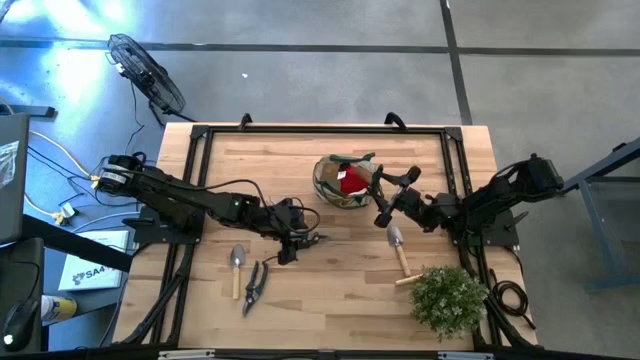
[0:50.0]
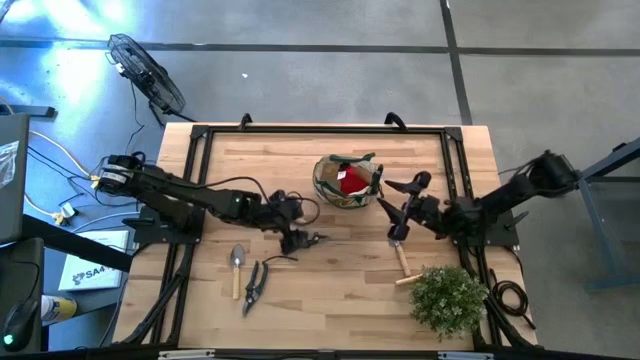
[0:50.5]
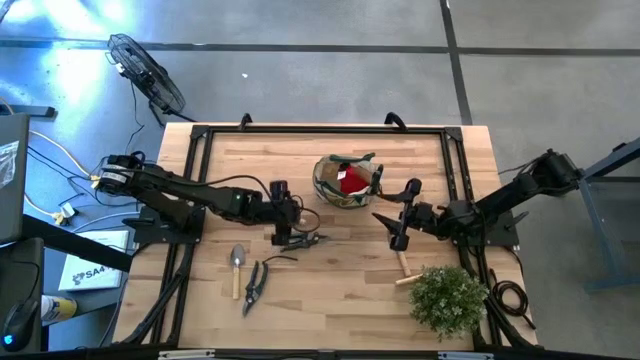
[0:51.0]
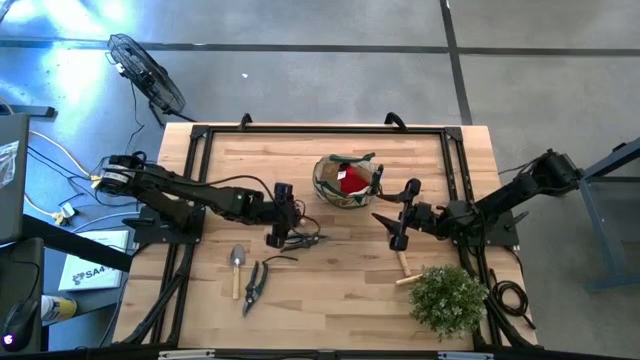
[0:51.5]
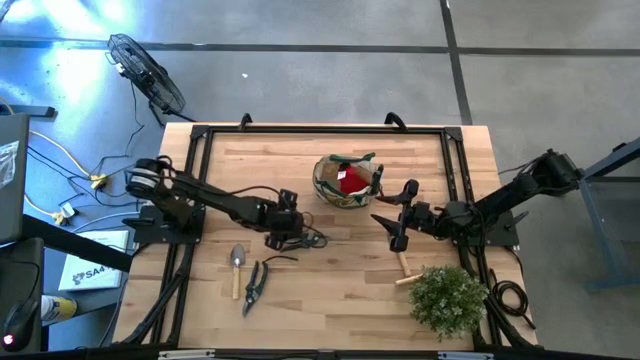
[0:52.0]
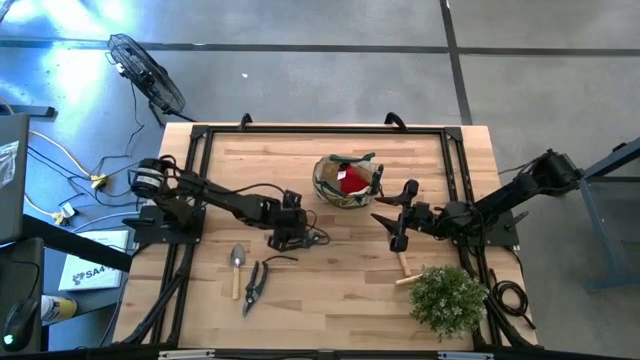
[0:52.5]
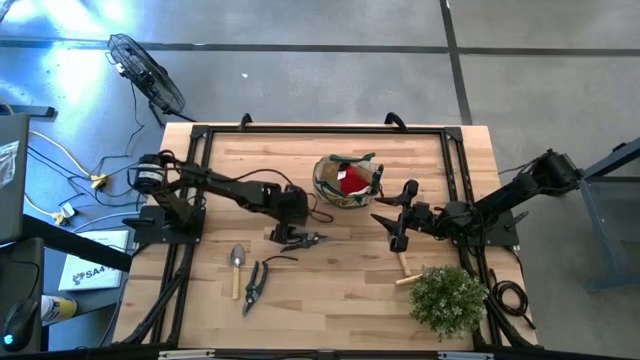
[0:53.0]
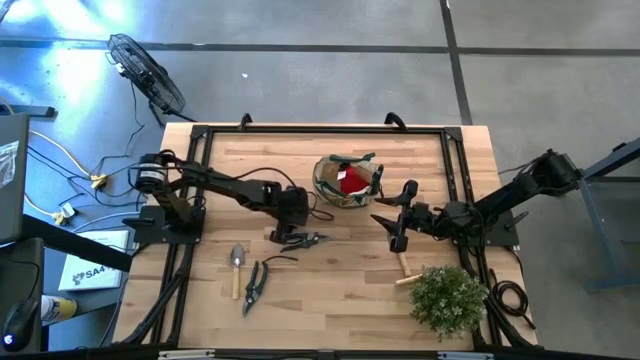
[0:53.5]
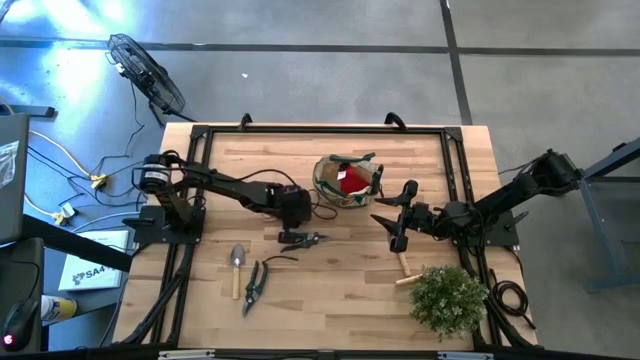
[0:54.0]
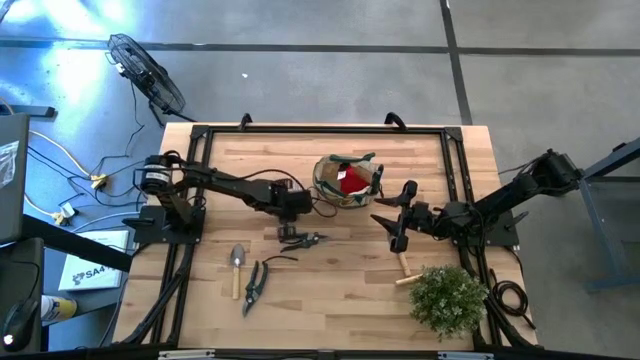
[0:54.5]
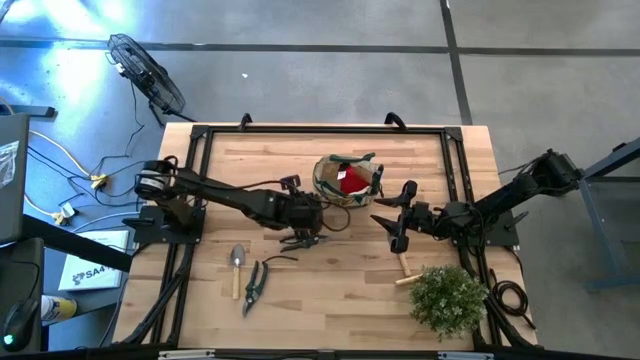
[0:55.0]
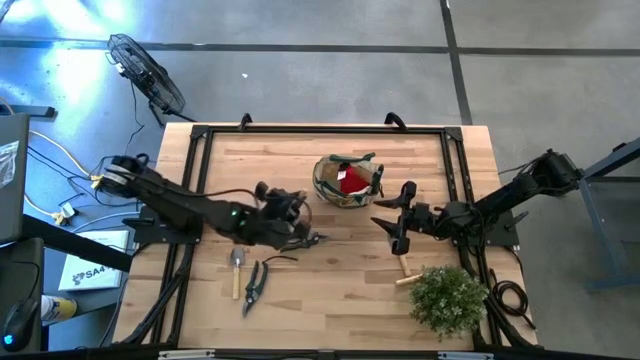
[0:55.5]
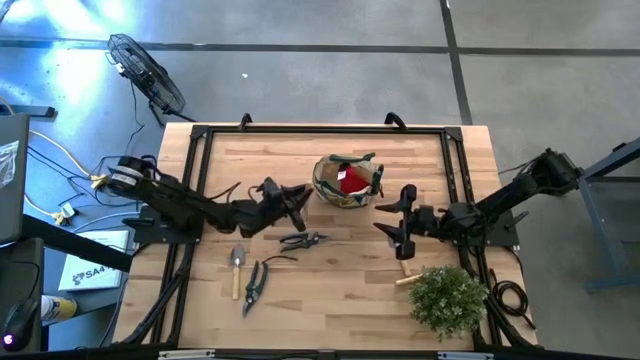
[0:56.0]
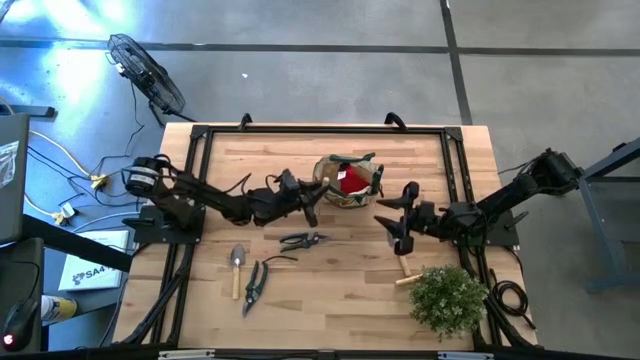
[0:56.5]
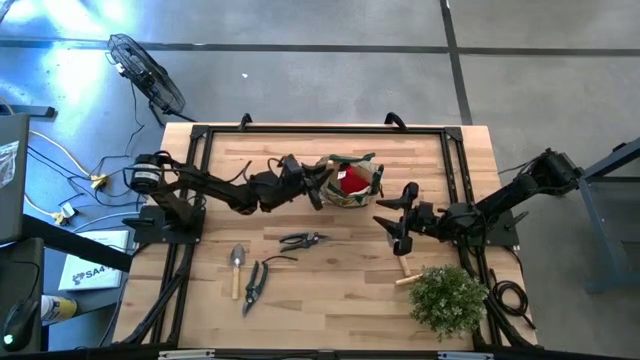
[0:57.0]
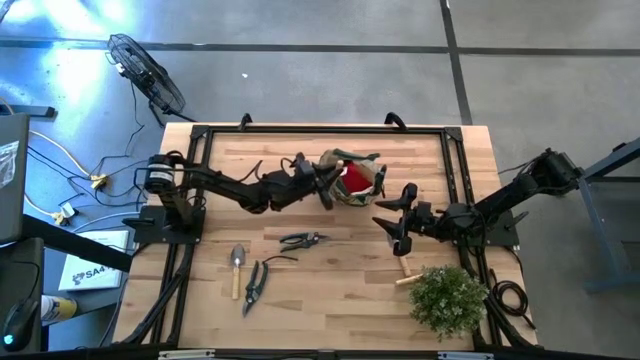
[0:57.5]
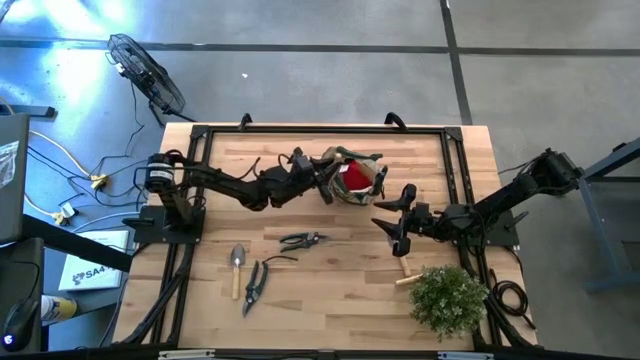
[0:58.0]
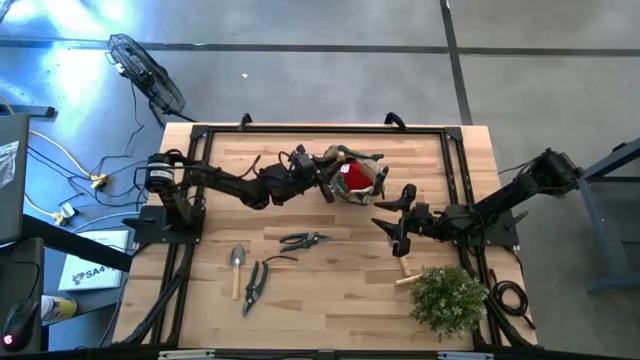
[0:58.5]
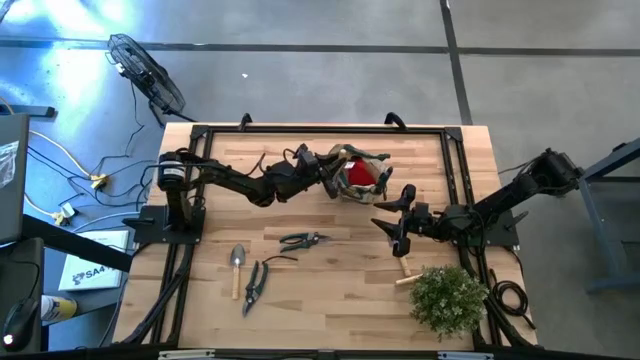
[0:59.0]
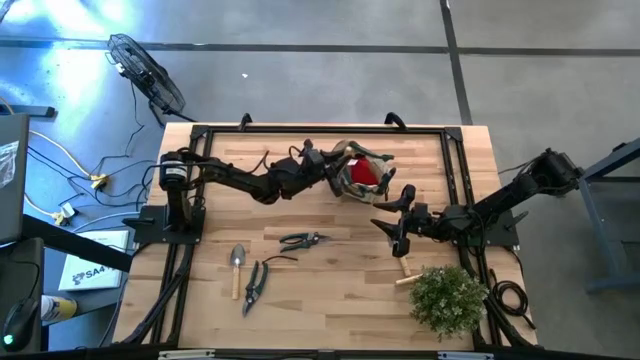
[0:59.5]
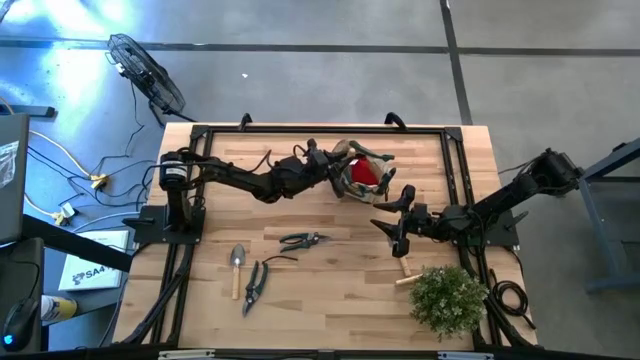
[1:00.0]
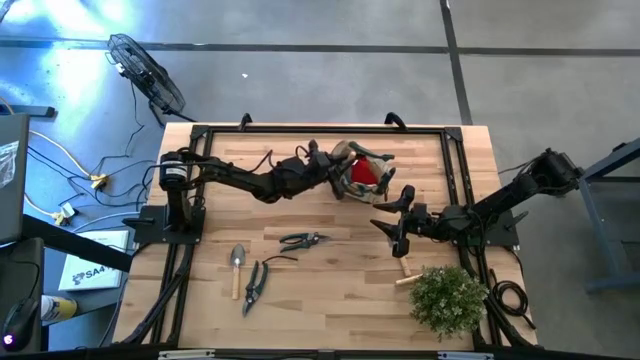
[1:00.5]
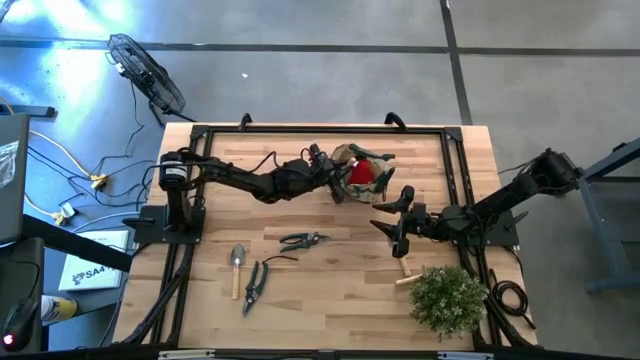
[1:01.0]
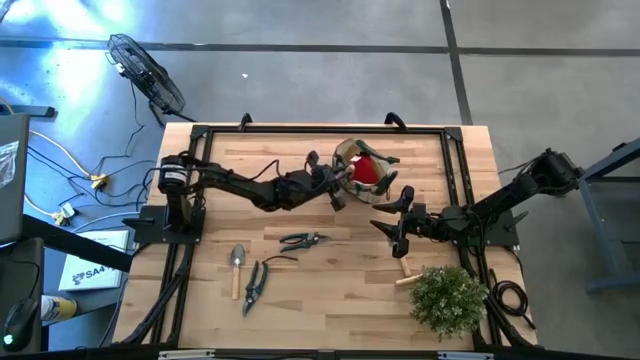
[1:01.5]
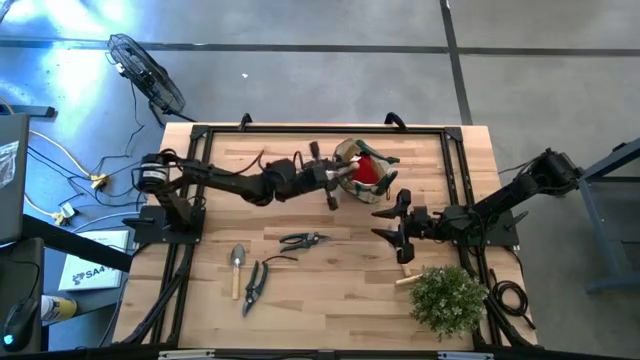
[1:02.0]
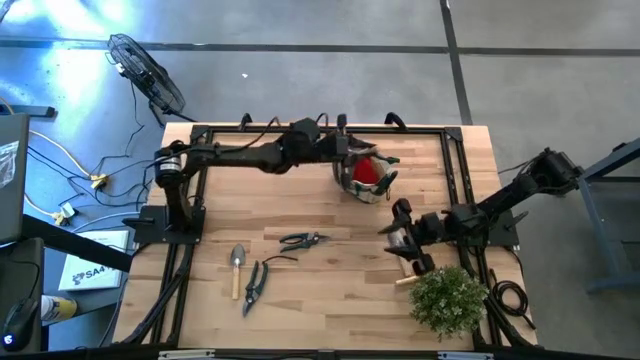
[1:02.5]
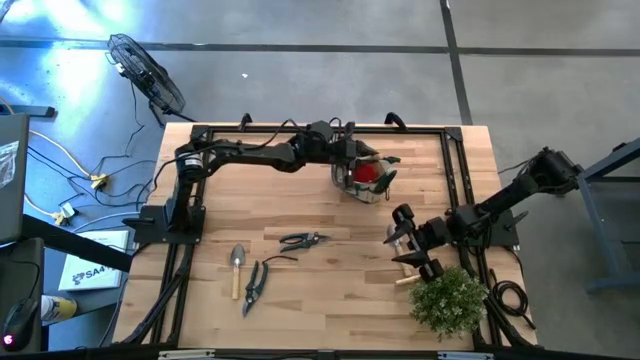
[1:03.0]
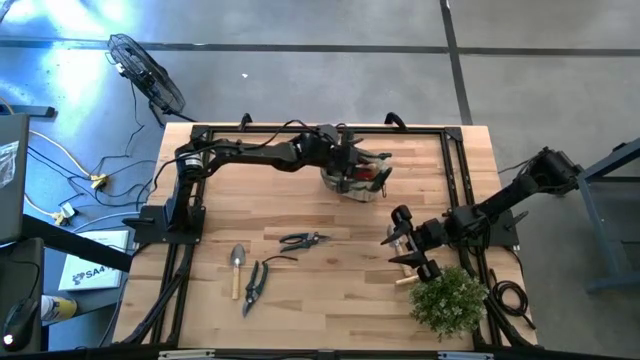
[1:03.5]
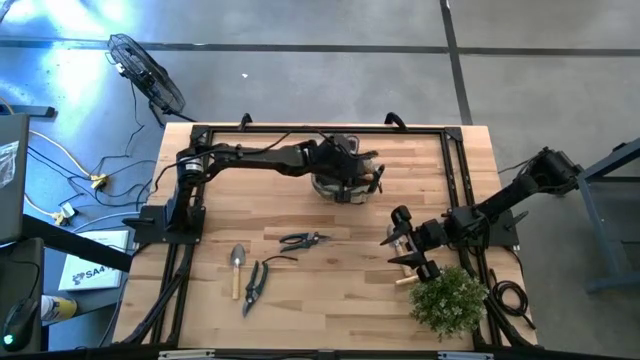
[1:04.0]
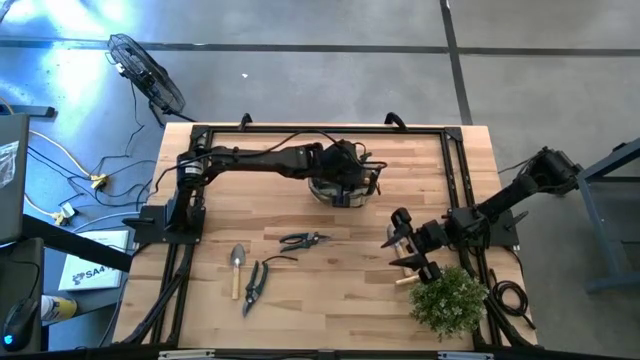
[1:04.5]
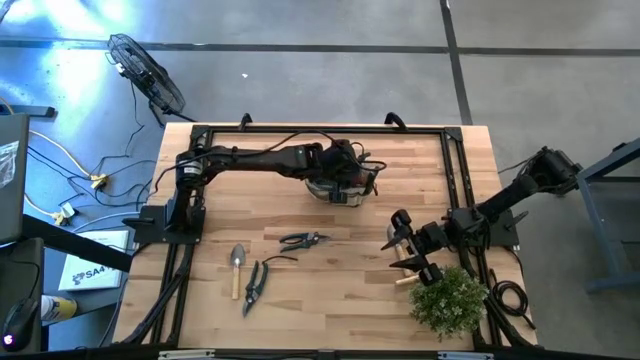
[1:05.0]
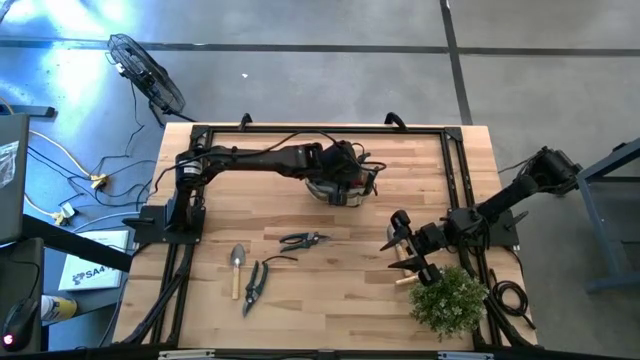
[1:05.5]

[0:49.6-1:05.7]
Task: Pick & Place Garden tools in Gardening bag
Put the brown hand rake into the light brown gardening bag

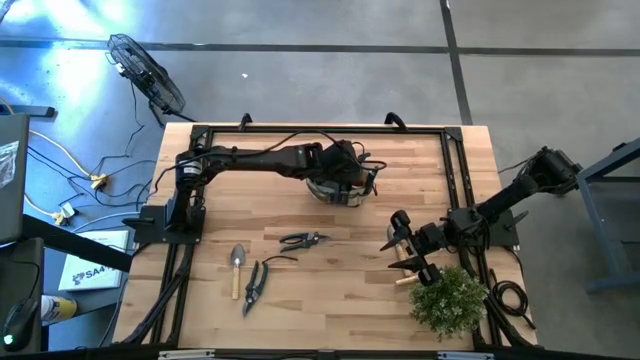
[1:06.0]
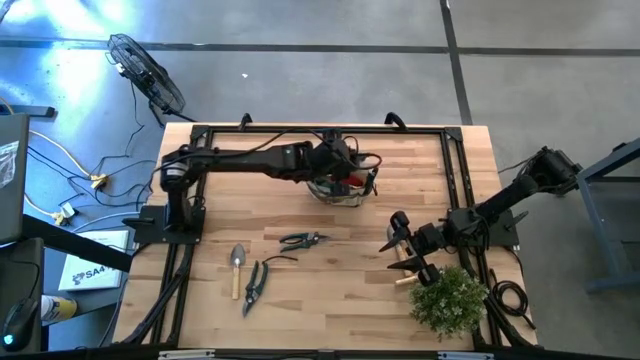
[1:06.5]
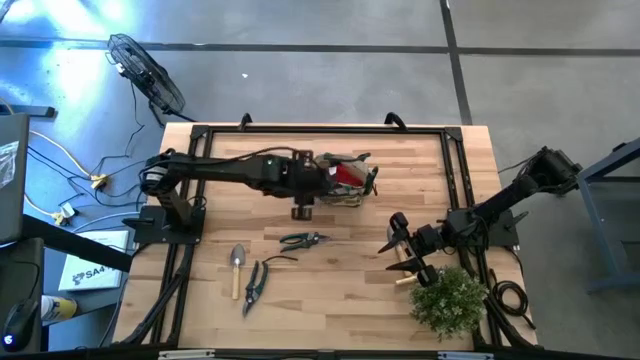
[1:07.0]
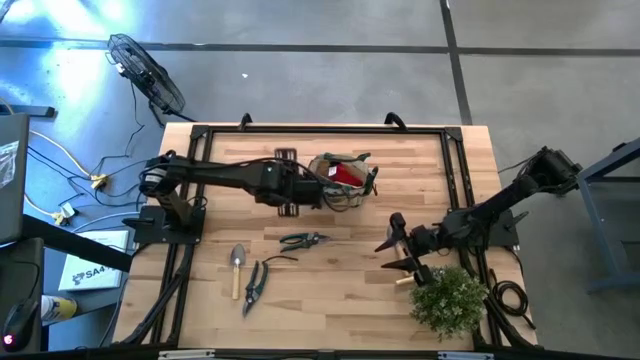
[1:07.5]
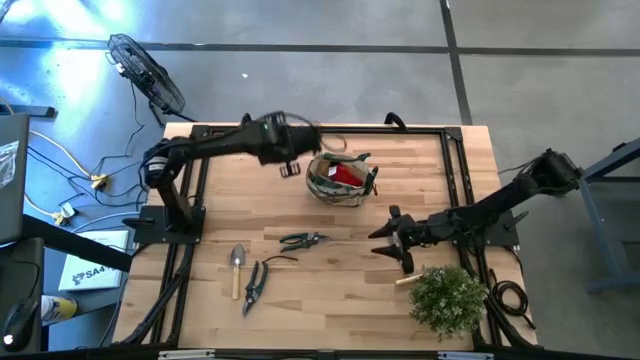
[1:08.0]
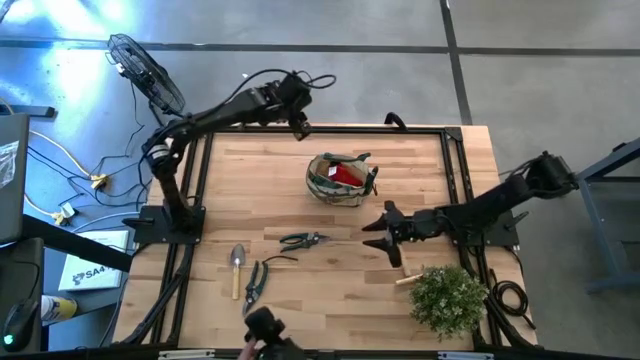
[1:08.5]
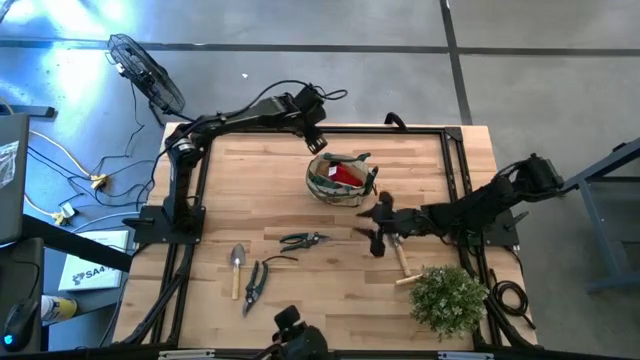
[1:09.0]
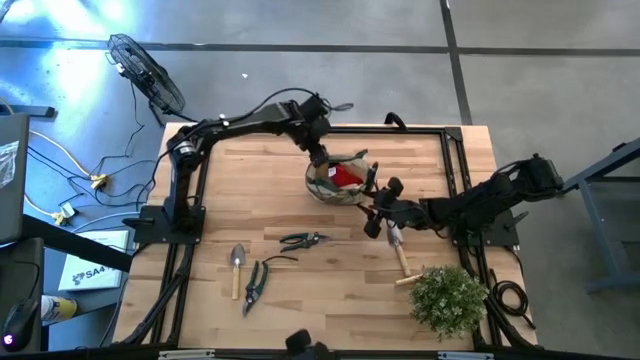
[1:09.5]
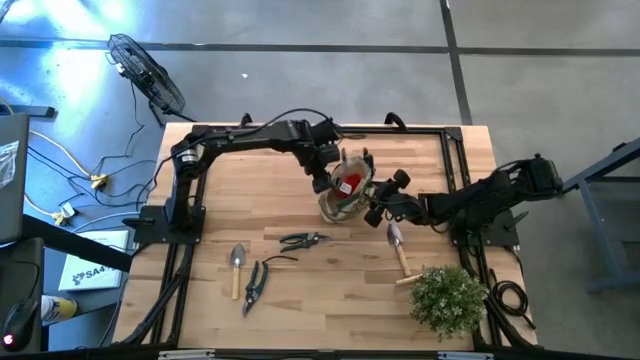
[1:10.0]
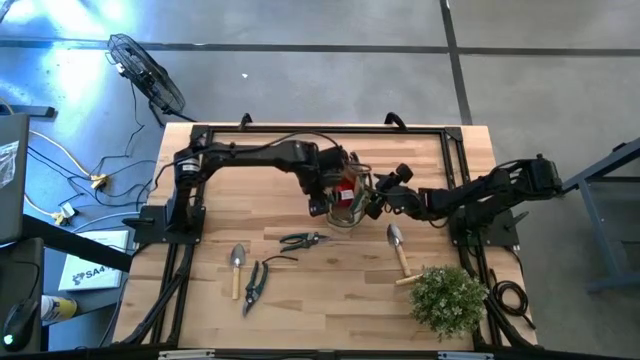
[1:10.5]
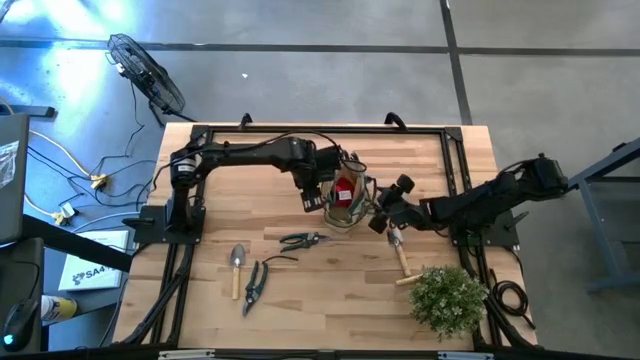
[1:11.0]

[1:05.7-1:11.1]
Adjust the light brown gardening bag

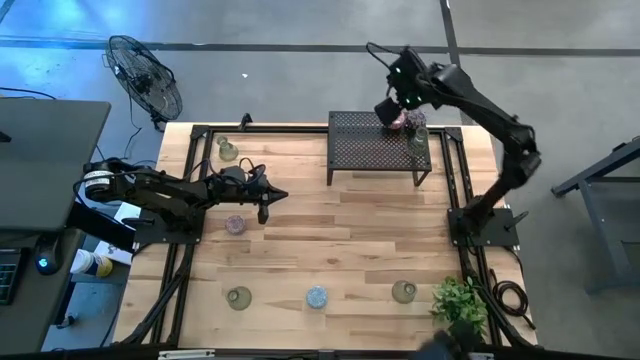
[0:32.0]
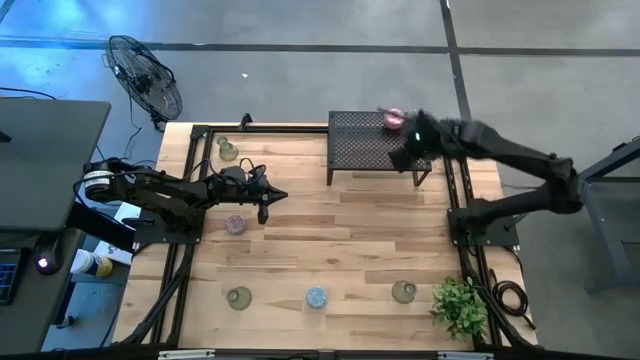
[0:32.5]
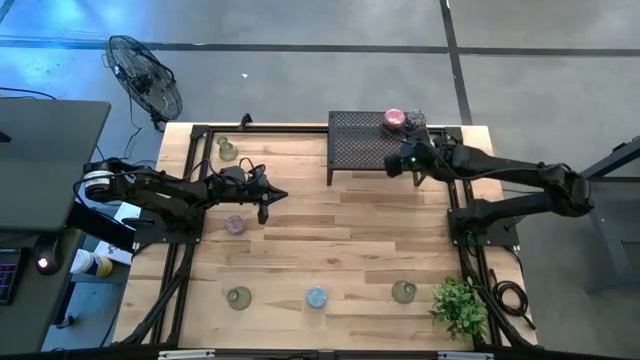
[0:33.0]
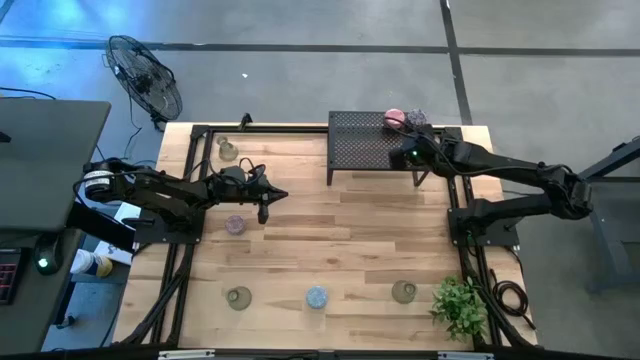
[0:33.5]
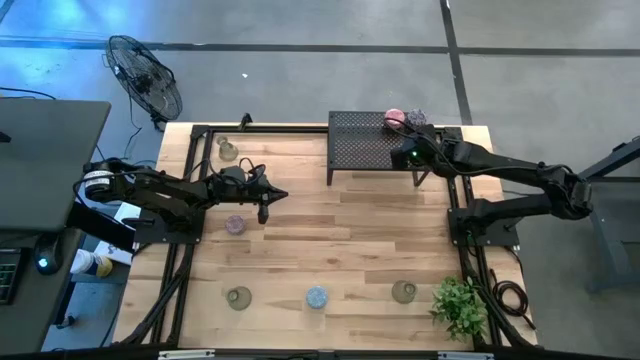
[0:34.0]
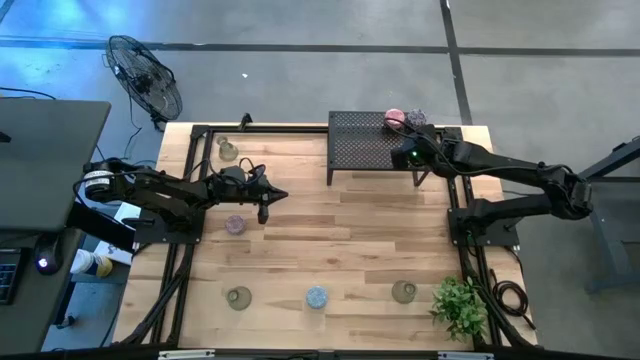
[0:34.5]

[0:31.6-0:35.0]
Task: Pick & Place candle stick holders
Adjust the green glass candle holder on the shelf
